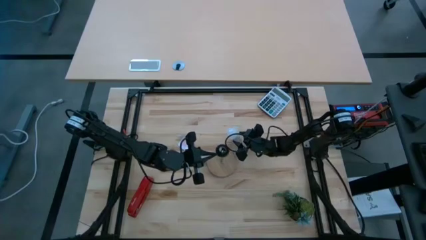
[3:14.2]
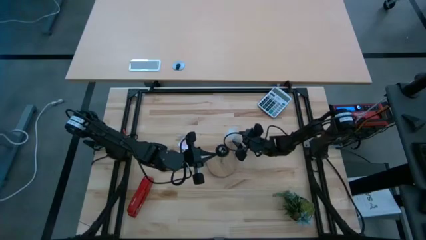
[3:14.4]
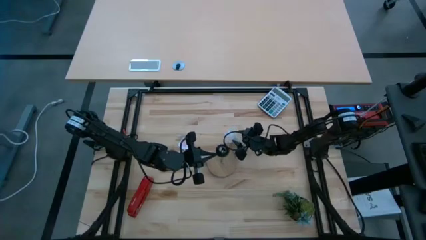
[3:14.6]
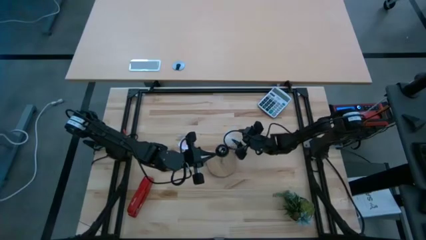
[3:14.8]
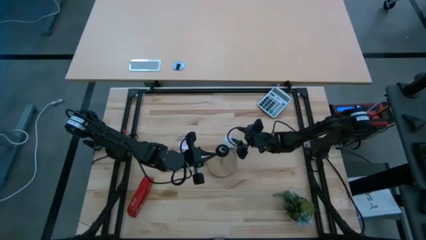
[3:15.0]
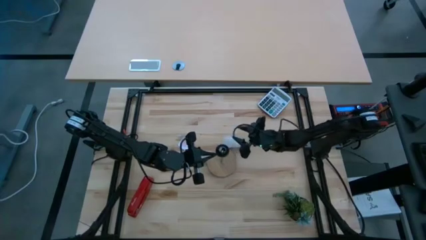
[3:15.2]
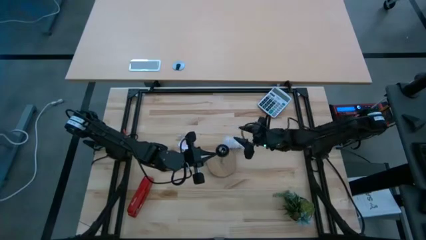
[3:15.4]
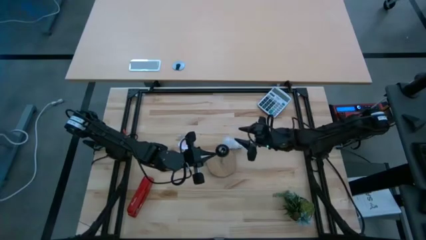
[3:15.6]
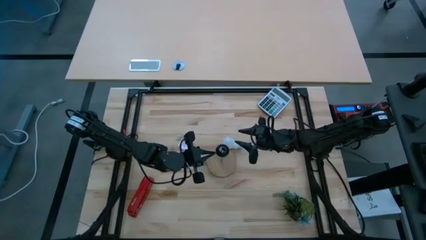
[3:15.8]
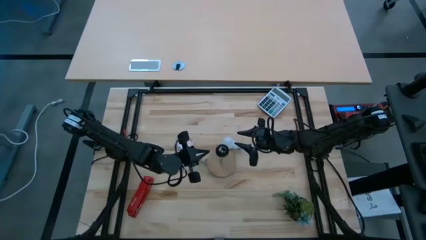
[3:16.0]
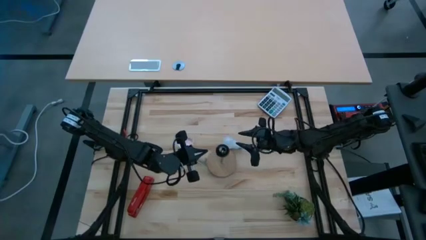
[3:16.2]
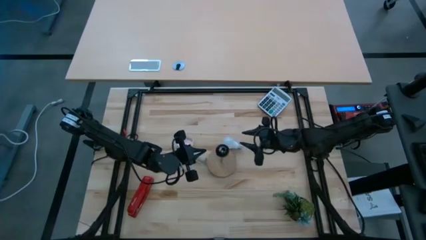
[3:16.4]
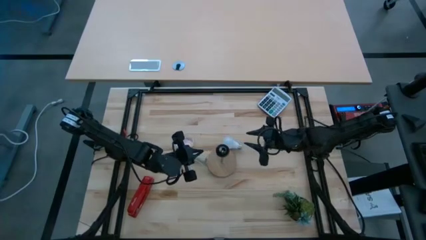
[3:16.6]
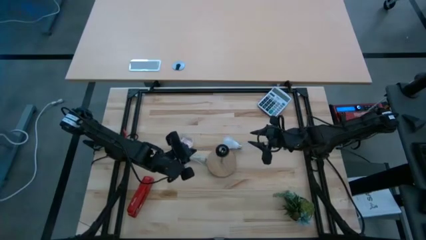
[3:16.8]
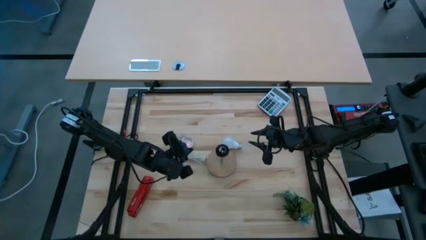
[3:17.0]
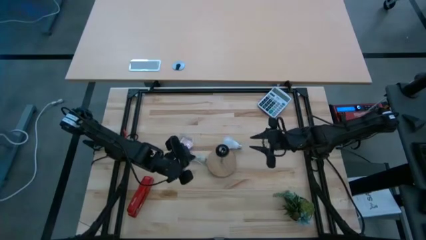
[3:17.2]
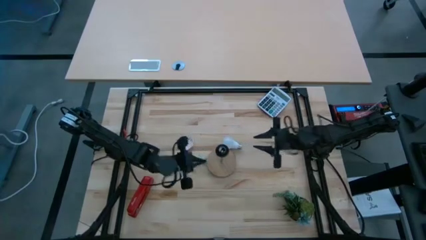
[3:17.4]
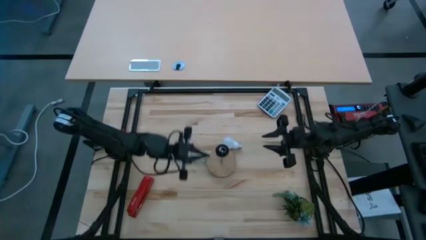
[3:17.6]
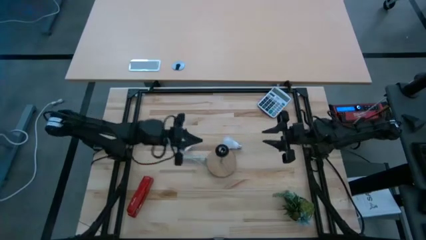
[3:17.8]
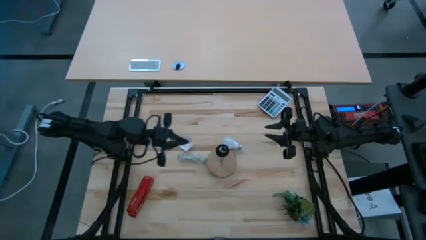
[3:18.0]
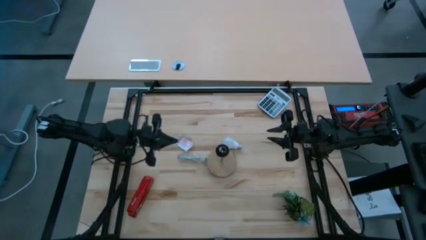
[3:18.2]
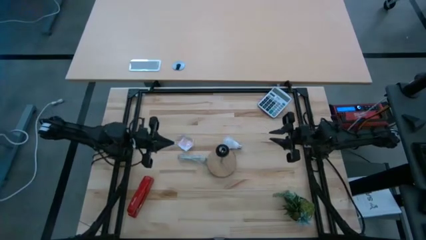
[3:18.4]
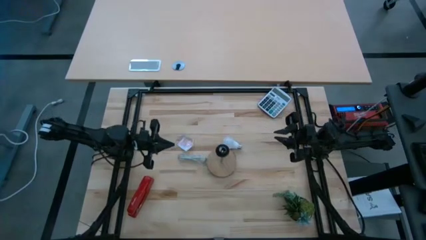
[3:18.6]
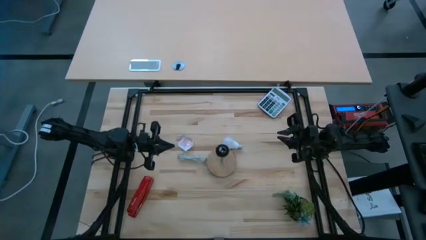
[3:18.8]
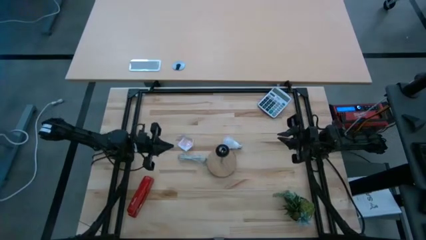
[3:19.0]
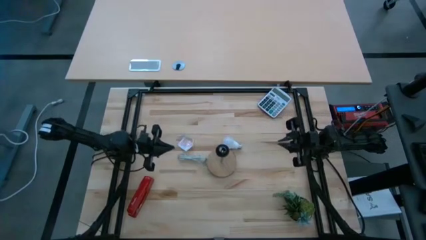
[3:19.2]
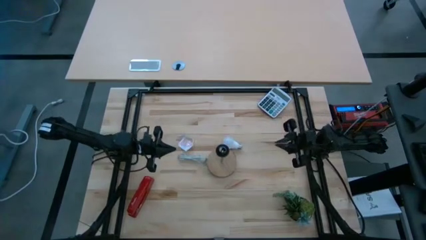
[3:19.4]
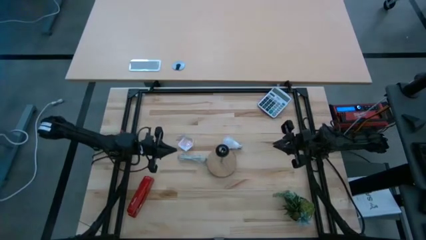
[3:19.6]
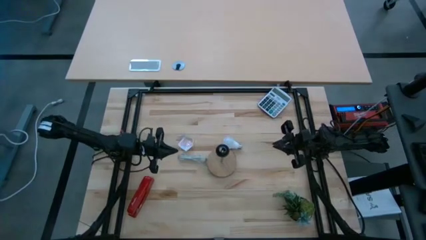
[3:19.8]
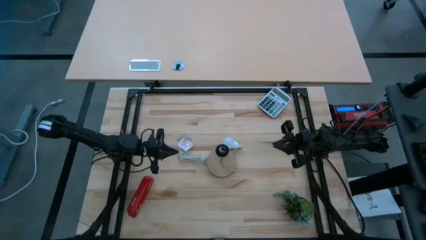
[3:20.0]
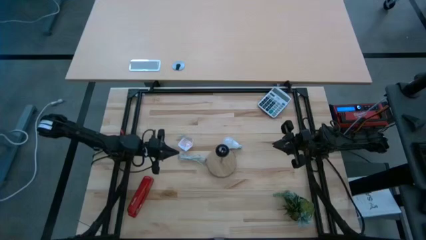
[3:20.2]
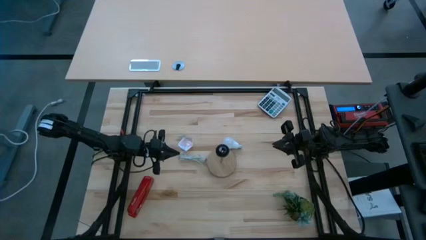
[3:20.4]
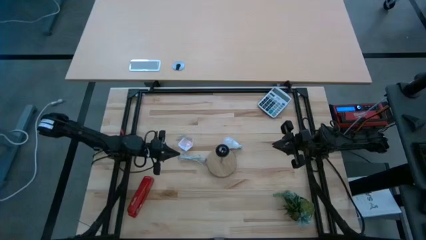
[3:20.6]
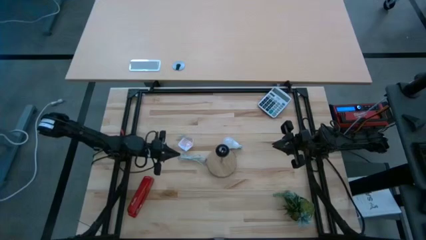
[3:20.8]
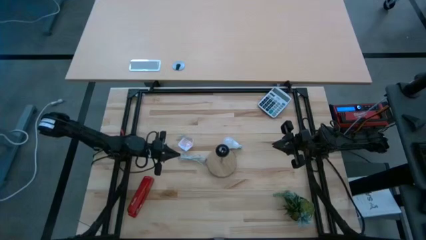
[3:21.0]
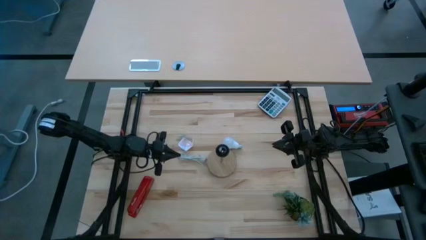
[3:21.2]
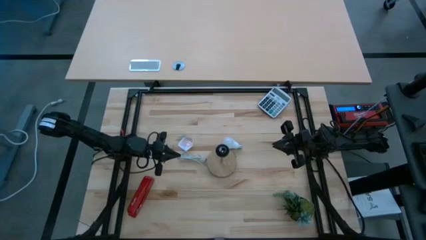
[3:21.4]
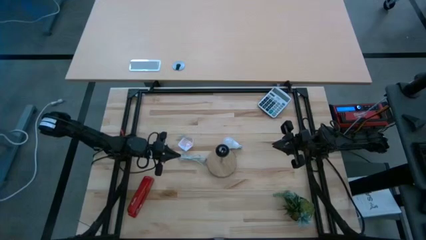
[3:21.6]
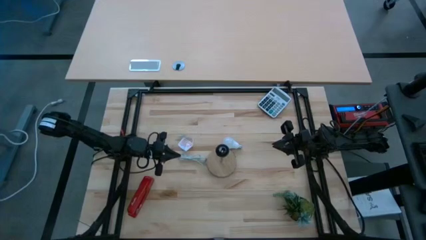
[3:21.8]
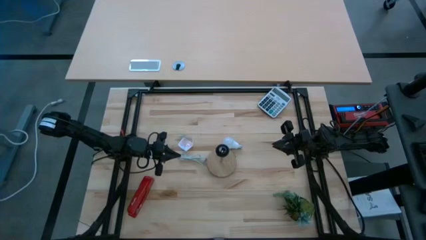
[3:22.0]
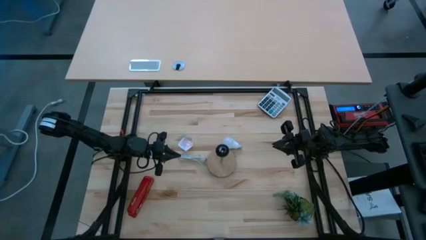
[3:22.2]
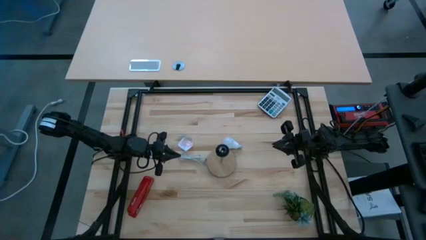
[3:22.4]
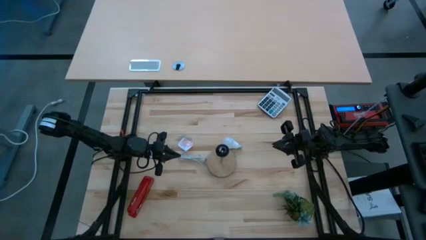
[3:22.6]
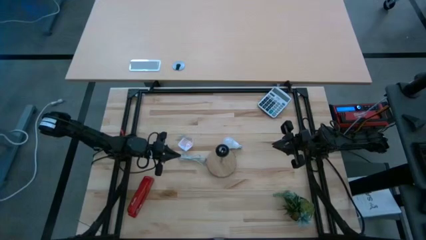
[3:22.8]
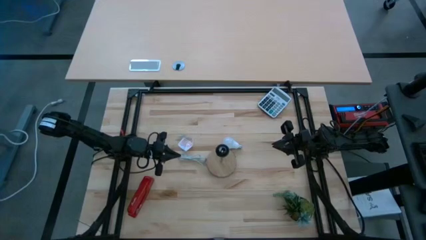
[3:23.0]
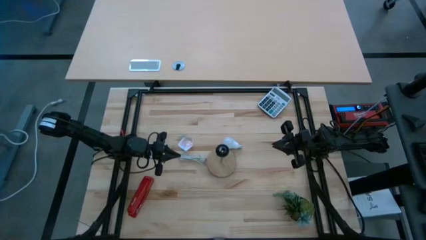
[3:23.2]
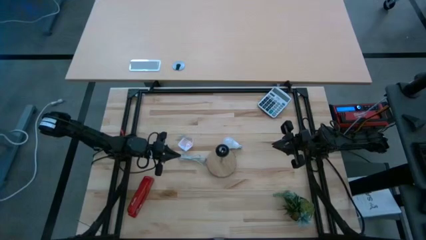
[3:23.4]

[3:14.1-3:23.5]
Task: Screw lightbulb
Return to Home Position

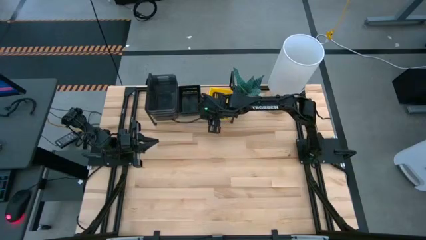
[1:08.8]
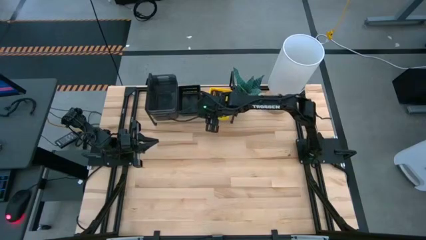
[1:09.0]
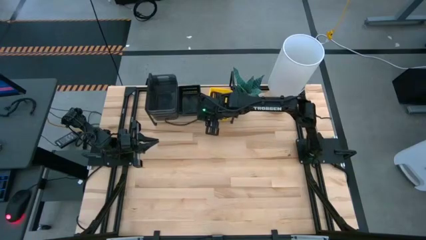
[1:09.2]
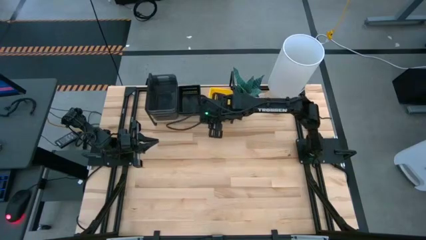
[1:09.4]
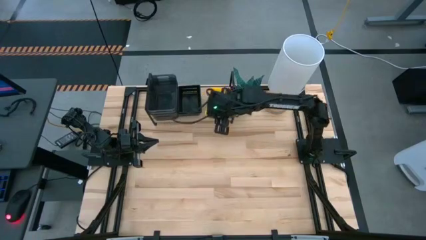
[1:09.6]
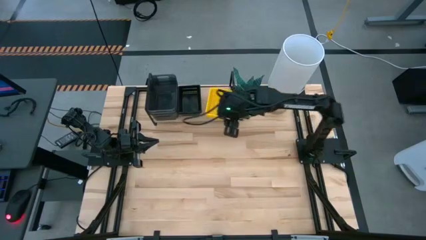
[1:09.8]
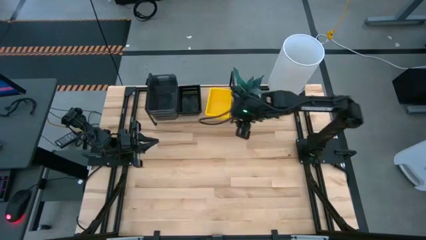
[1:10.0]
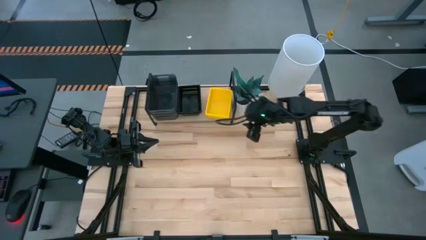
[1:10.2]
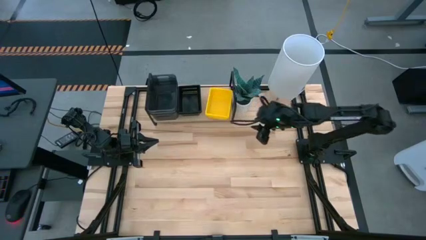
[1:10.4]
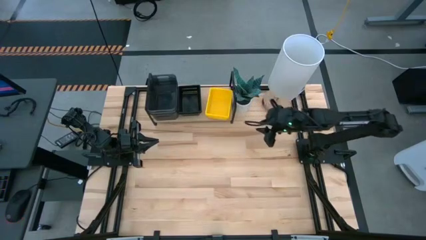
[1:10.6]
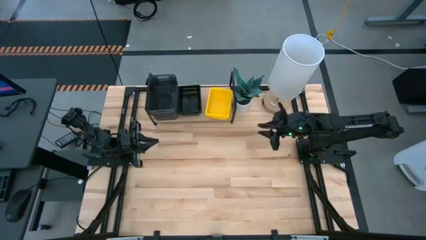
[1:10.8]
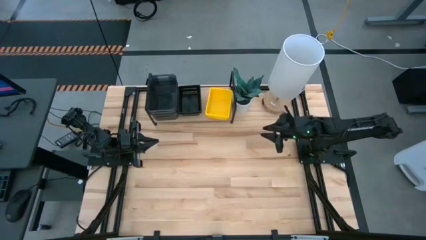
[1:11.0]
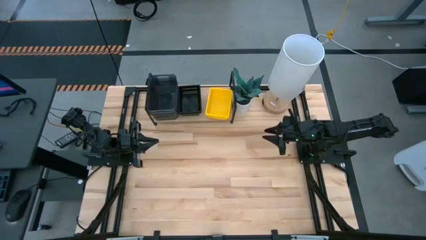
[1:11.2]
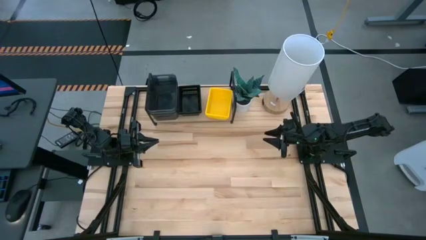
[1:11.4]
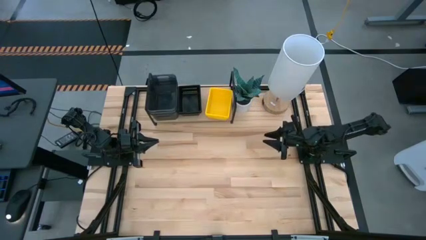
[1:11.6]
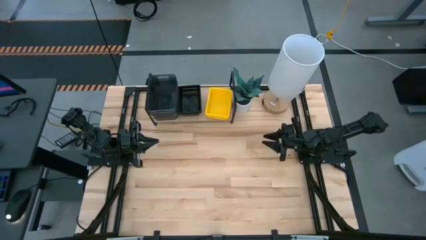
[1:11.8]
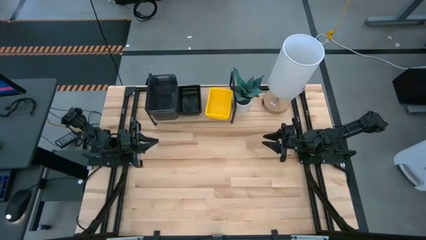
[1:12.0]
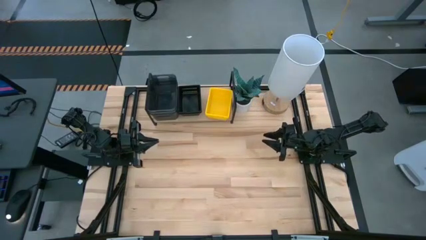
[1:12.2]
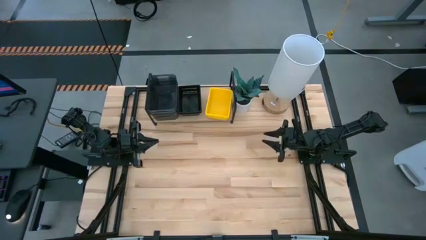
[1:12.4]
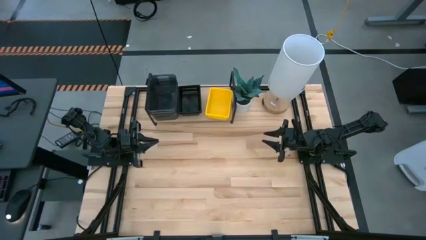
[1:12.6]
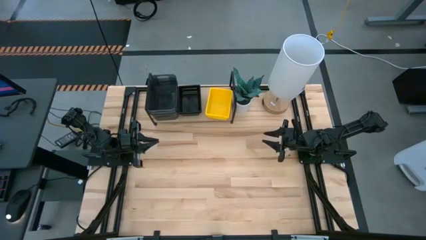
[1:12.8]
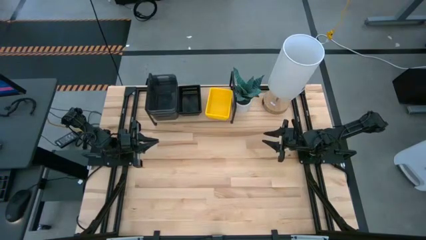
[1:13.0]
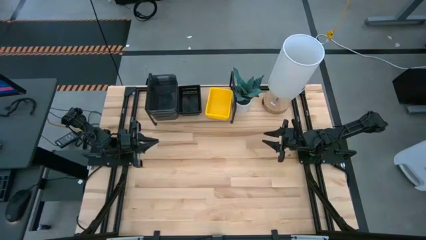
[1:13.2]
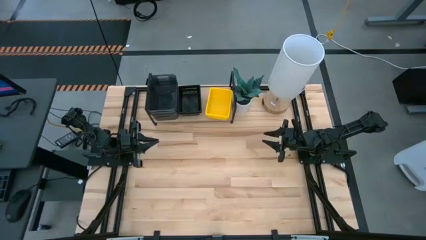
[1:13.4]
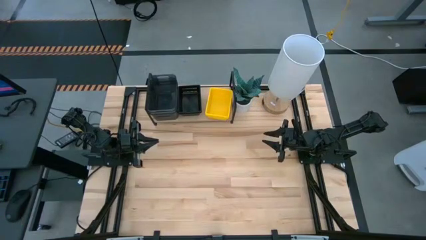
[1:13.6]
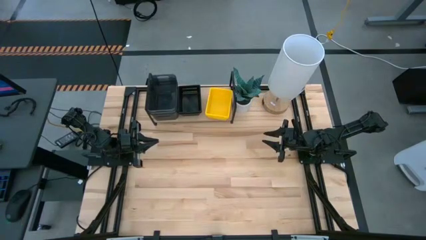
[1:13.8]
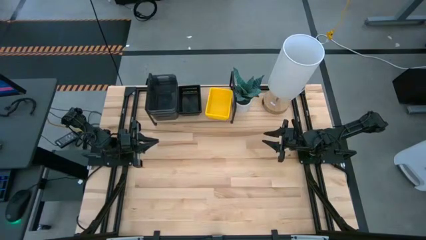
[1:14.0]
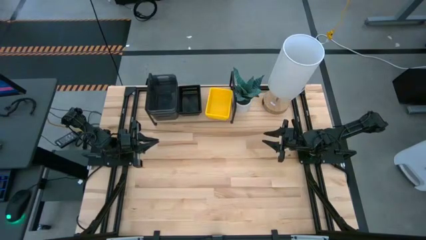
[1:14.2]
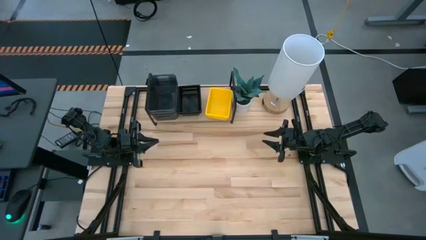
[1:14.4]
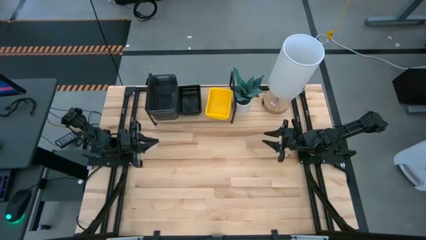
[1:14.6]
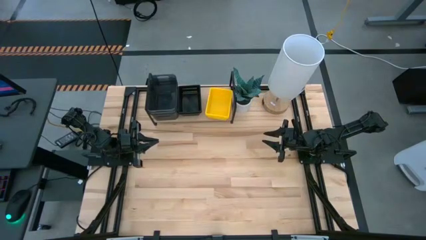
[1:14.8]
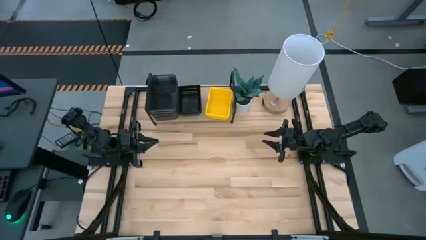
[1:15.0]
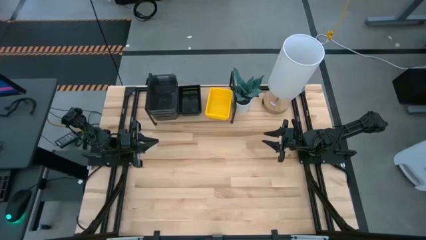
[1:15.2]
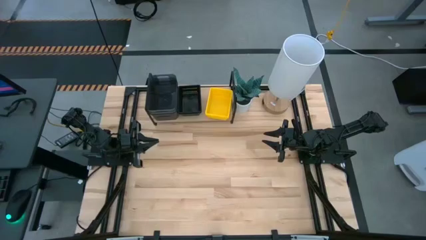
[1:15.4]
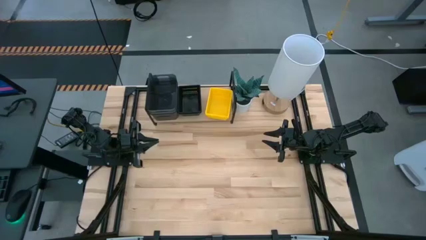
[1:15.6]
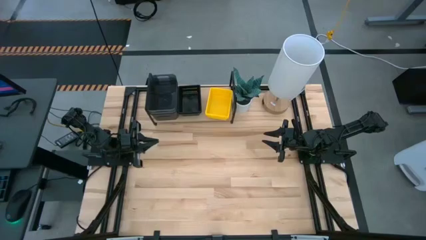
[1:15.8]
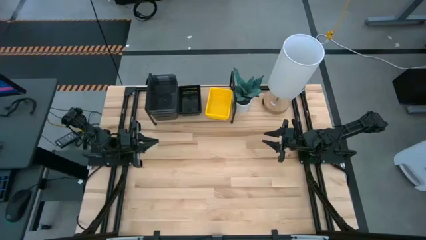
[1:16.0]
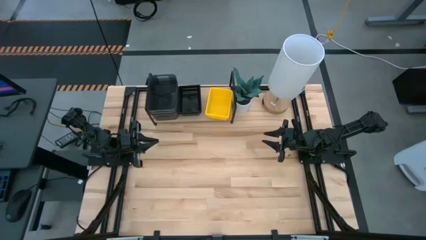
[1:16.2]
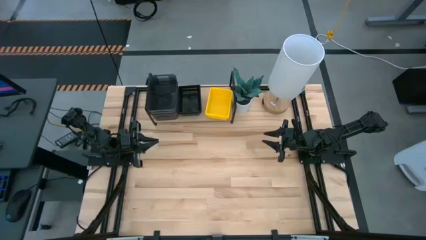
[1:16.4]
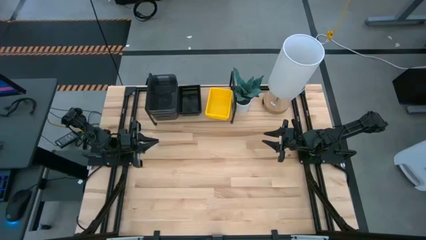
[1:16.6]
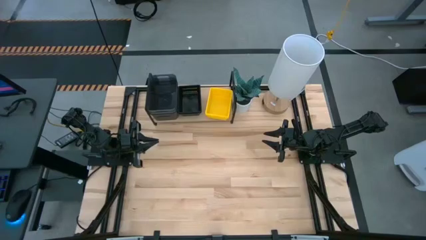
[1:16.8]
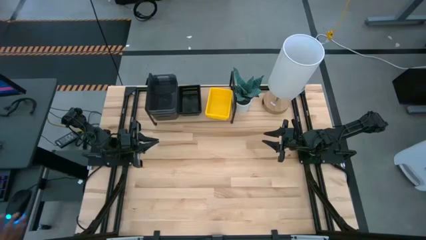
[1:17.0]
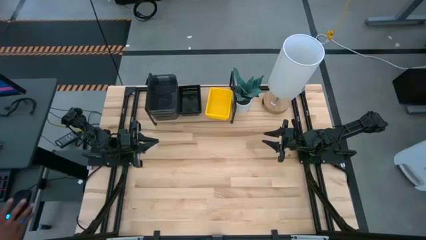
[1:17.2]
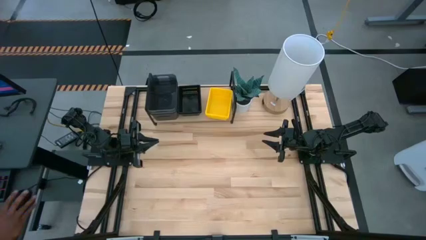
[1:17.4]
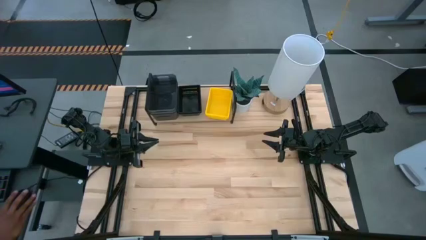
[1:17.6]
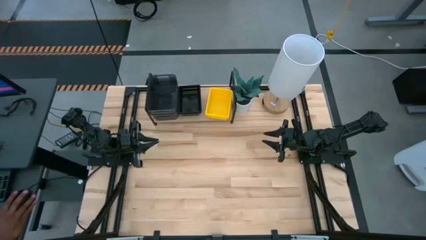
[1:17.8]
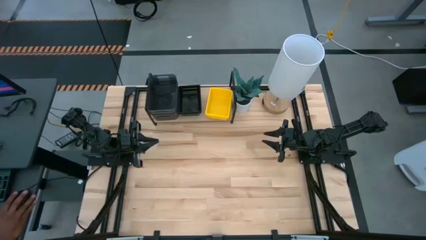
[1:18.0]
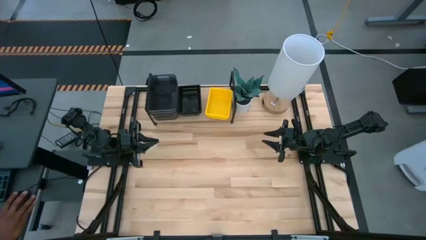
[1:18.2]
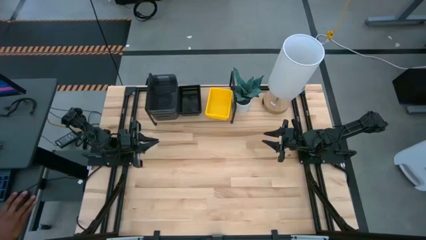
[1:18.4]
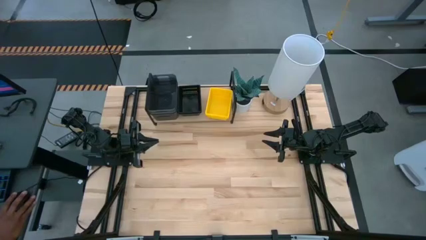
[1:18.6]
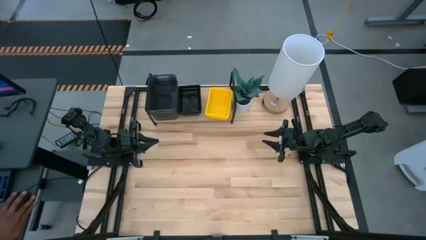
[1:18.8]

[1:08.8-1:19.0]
Task: Stack baskets on shelf by color
Return to Home Position
